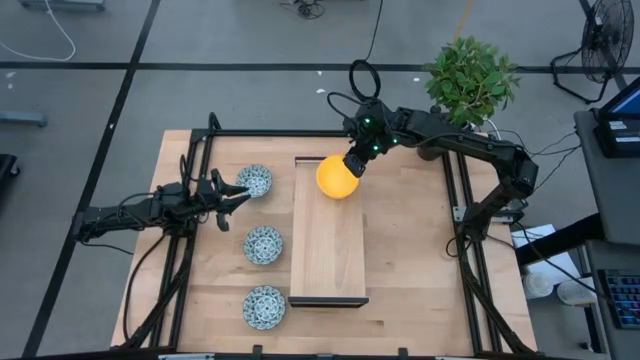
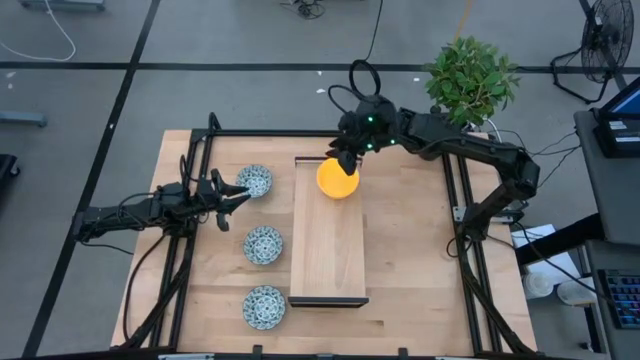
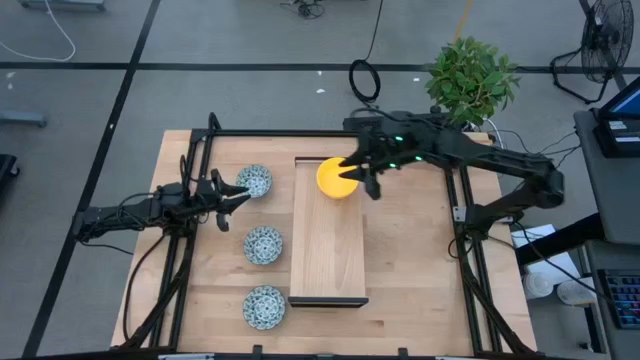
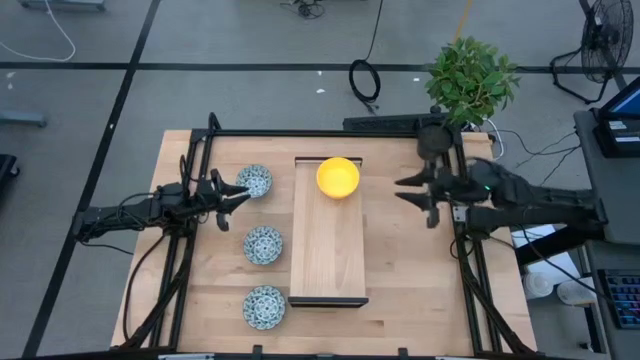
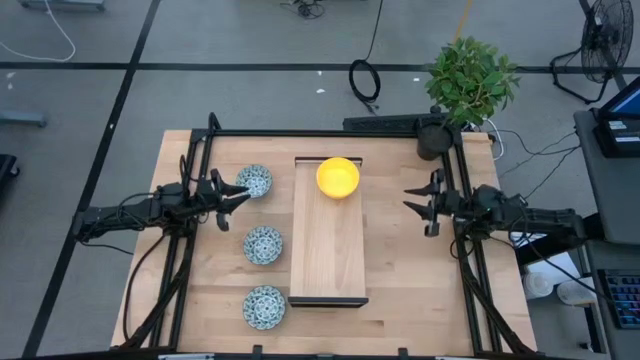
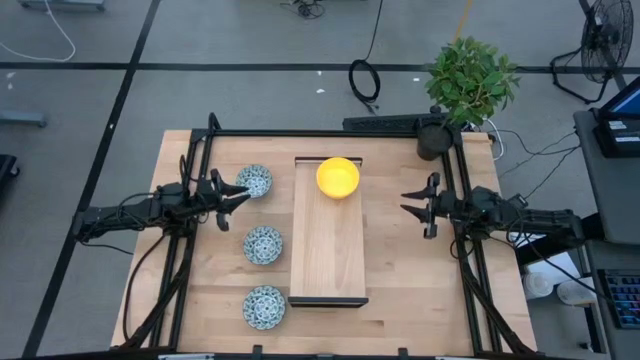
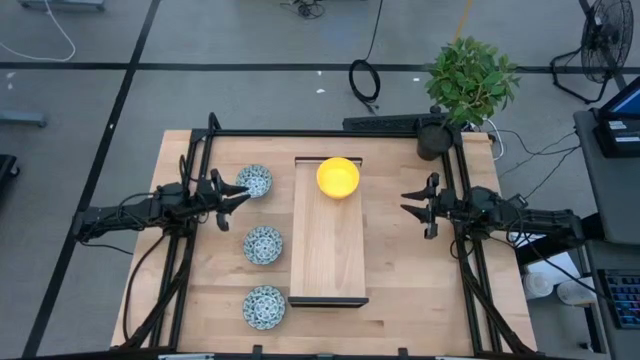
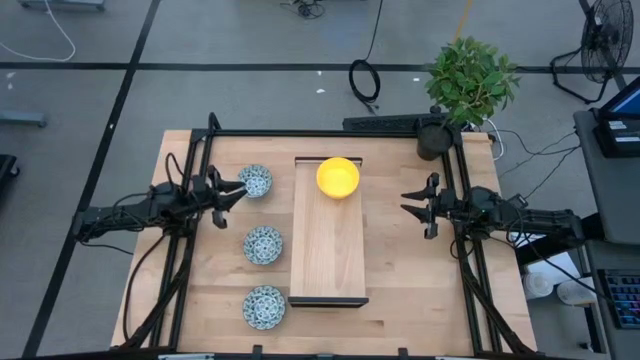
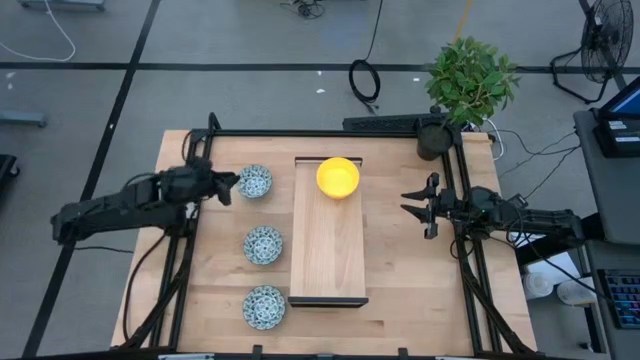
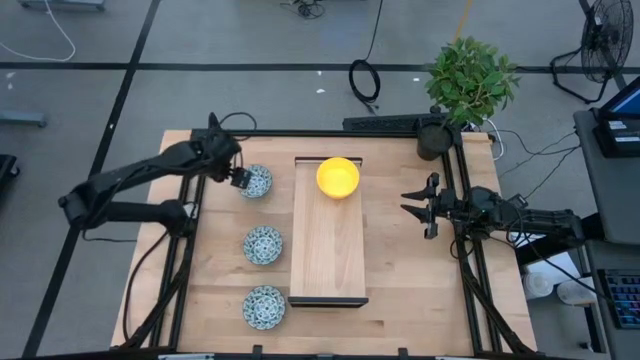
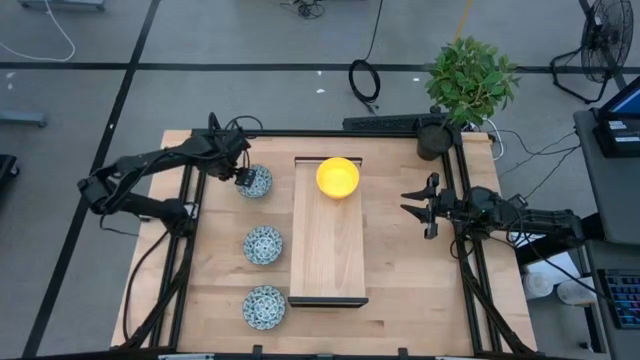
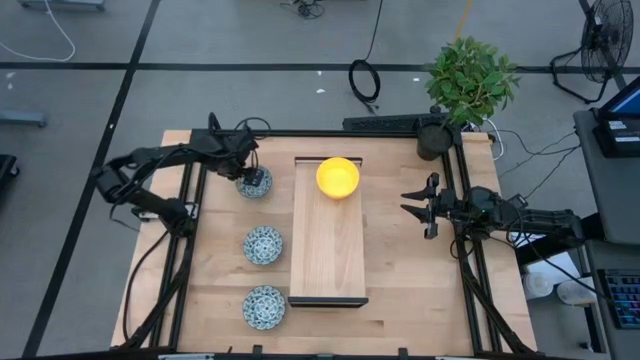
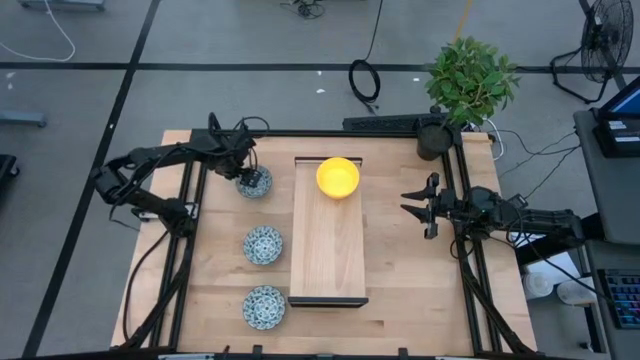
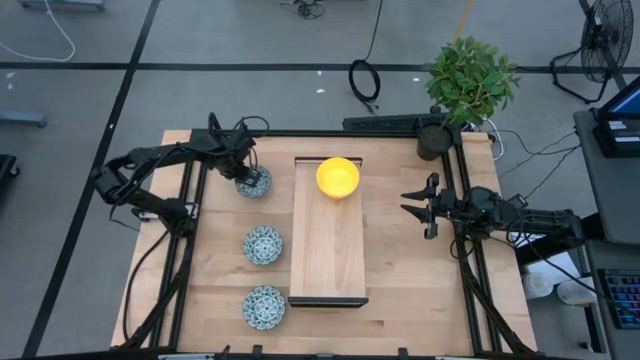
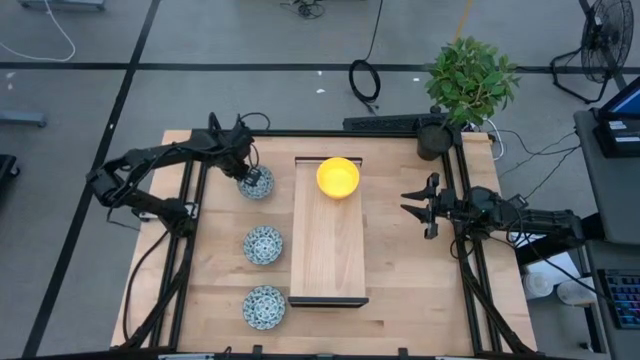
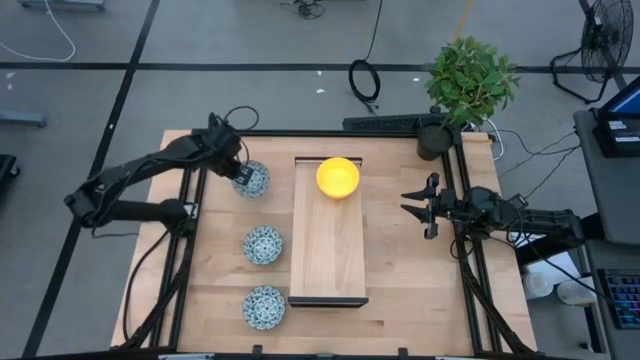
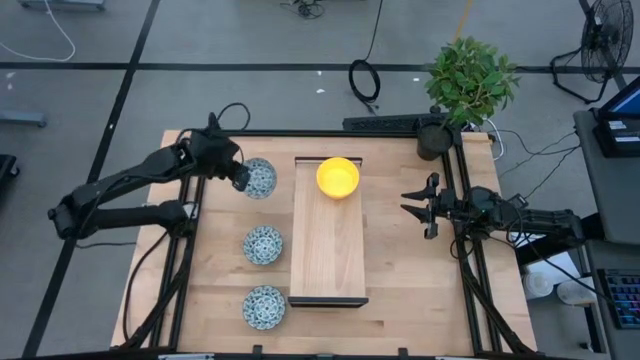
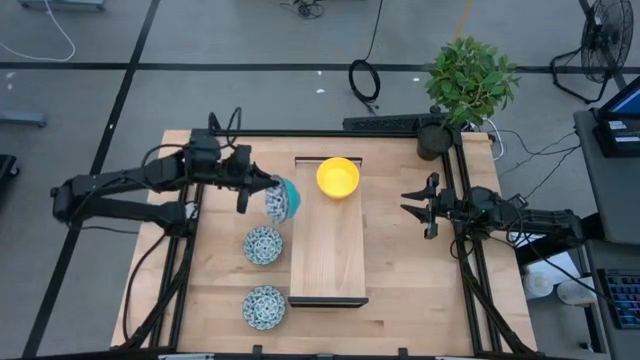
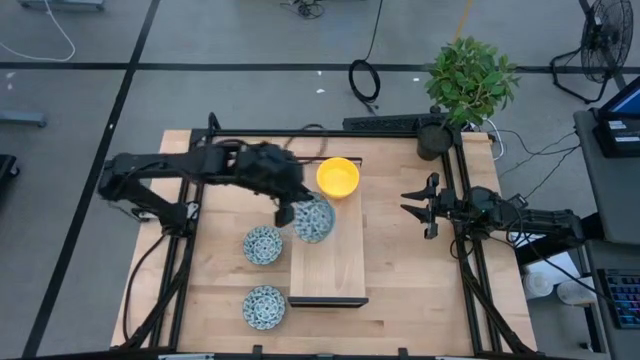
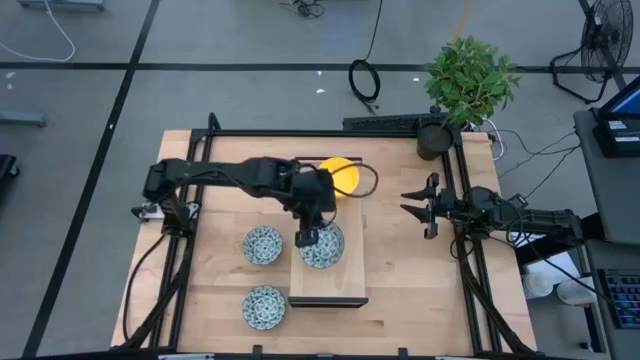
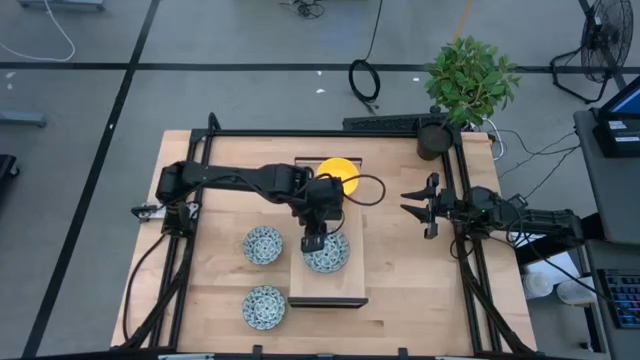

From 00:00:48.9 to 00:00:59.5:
Task: Pick & Place Mini bowls
Put the top blue patterned bowl on the shelf

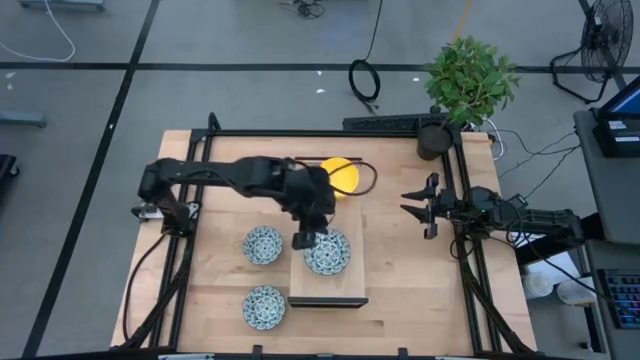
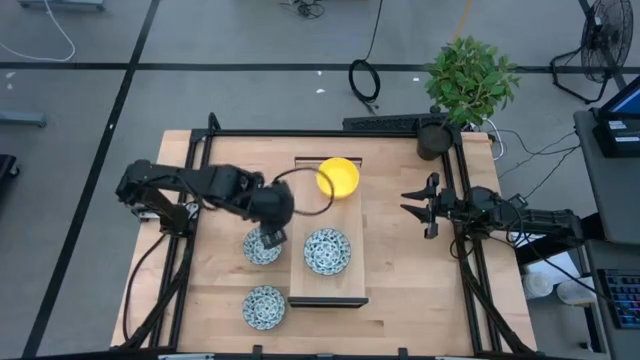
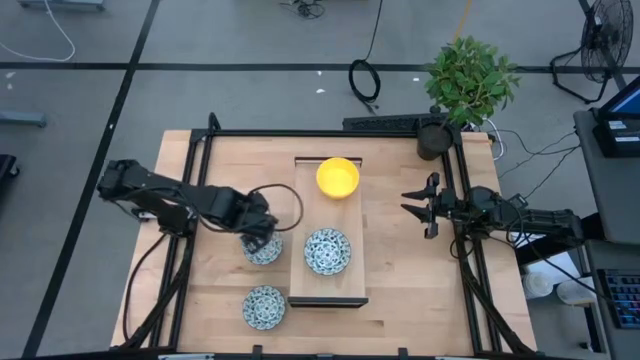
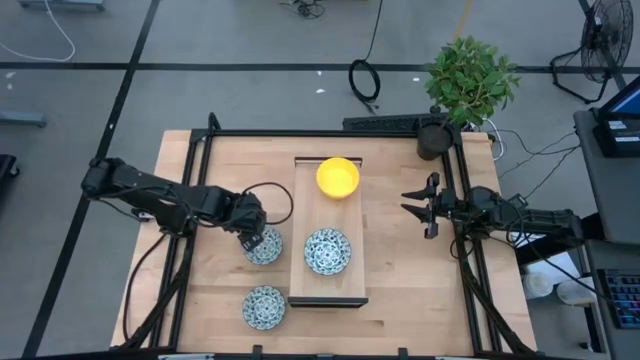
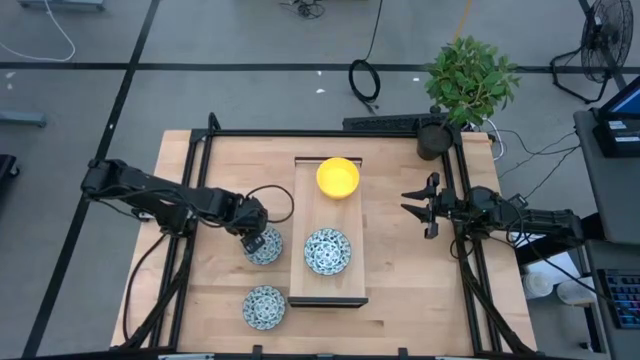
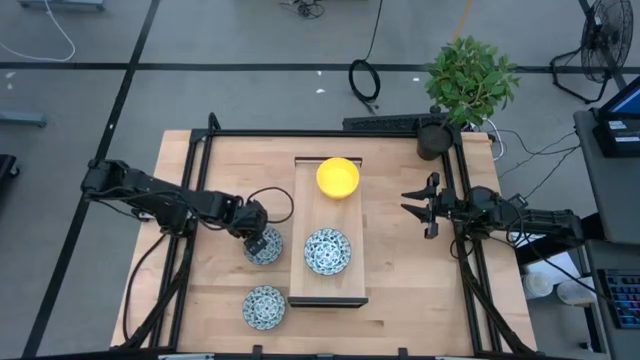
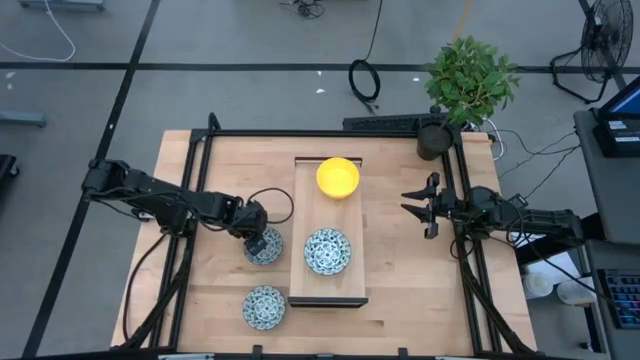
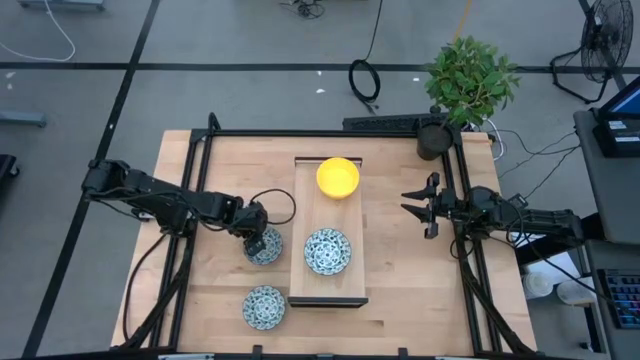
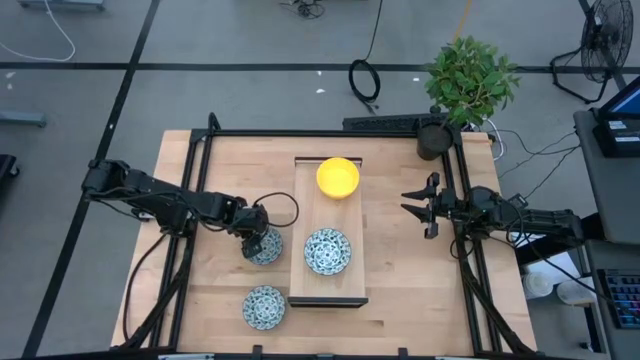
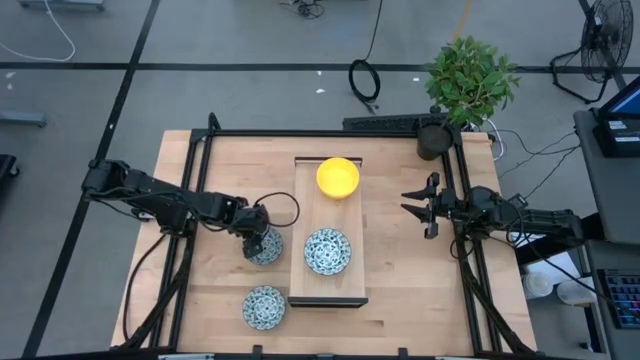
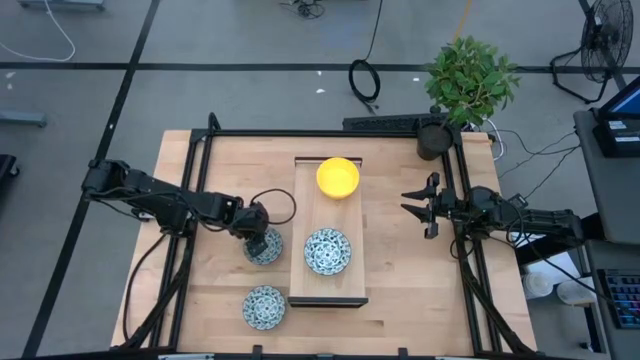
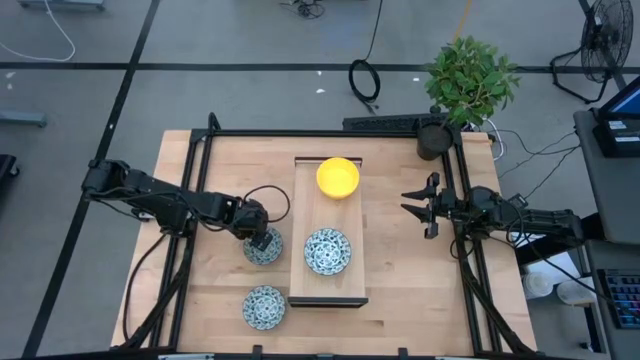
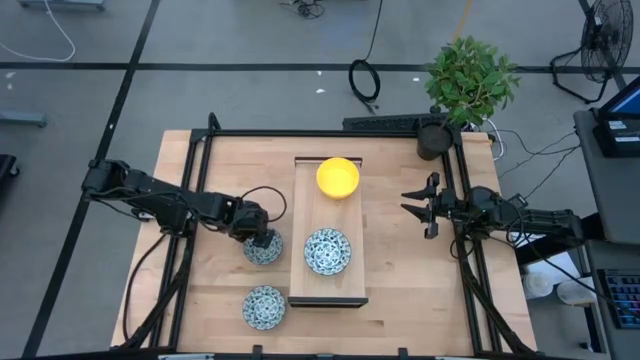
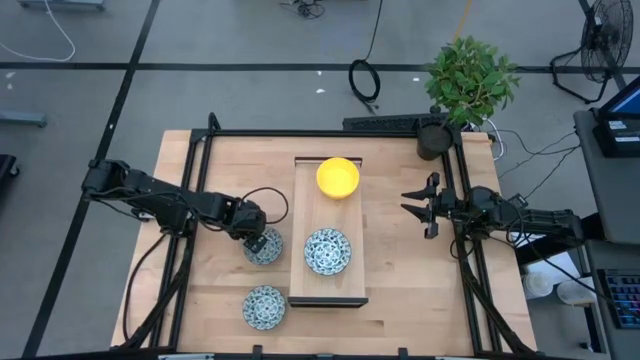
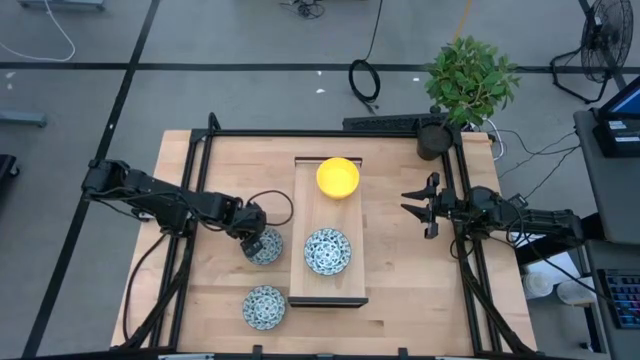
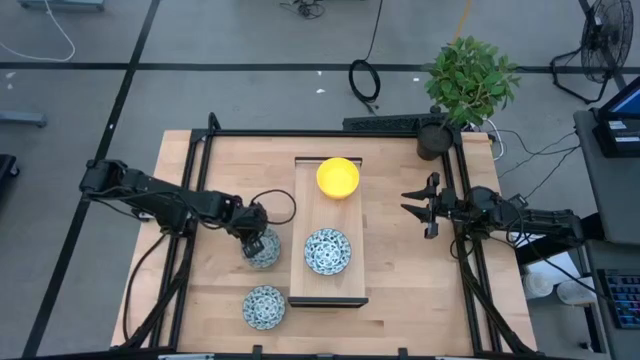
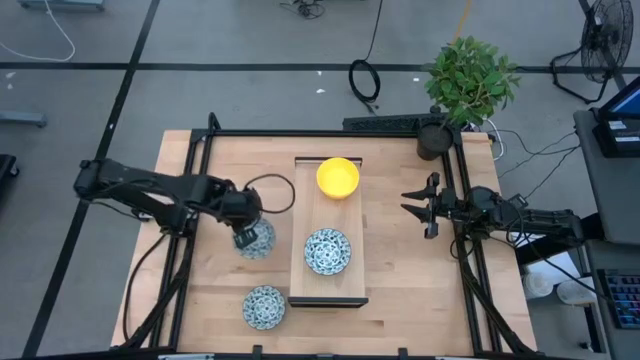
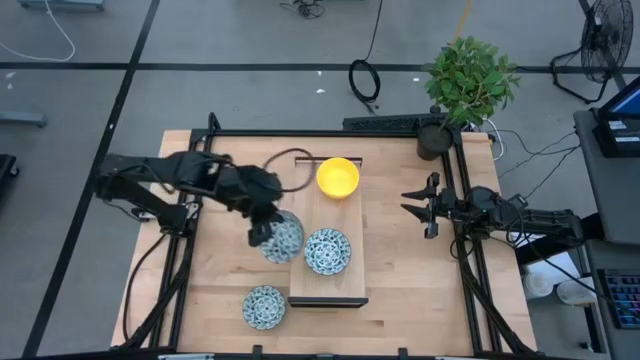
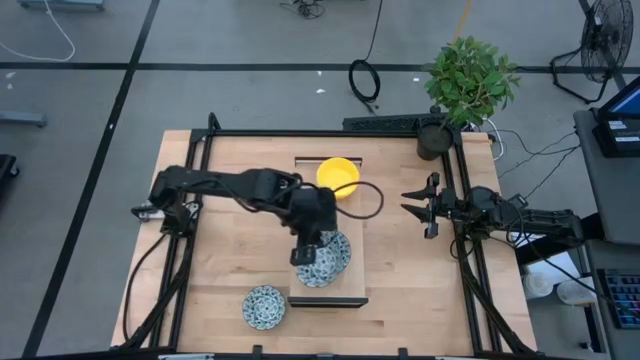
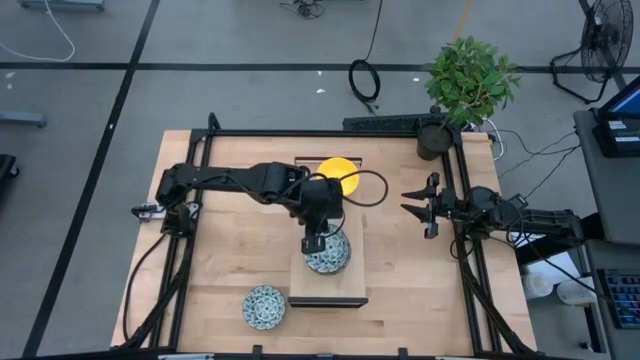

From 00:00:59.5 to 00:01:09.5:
Stack the bottom blue patterned bowl on top of the blue patterned bowl on the shelf
